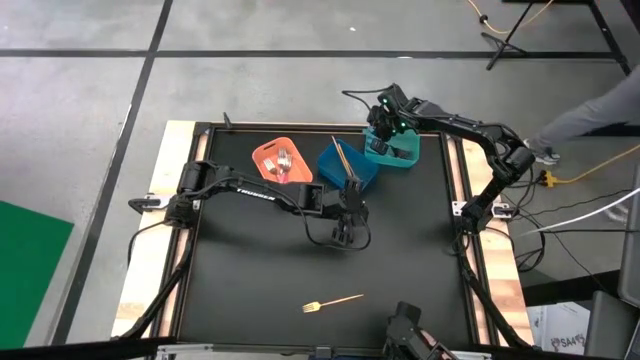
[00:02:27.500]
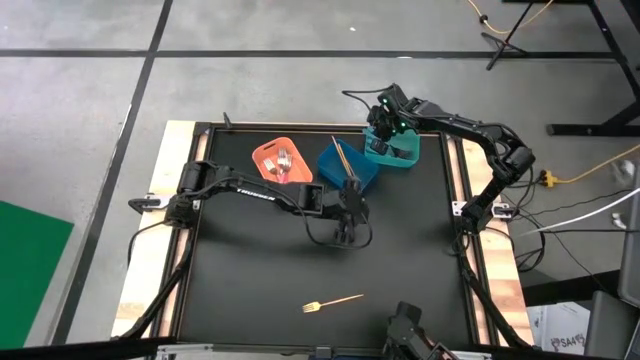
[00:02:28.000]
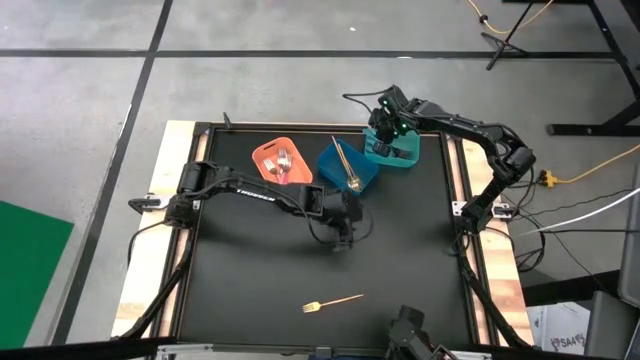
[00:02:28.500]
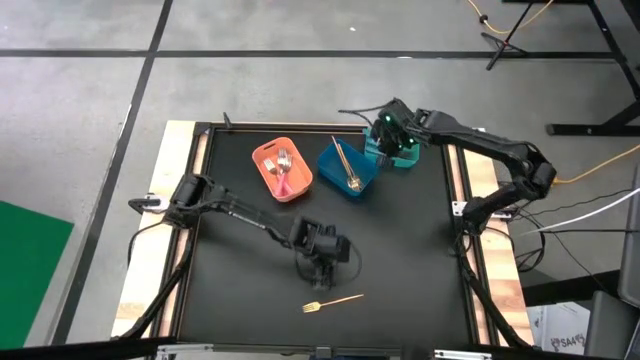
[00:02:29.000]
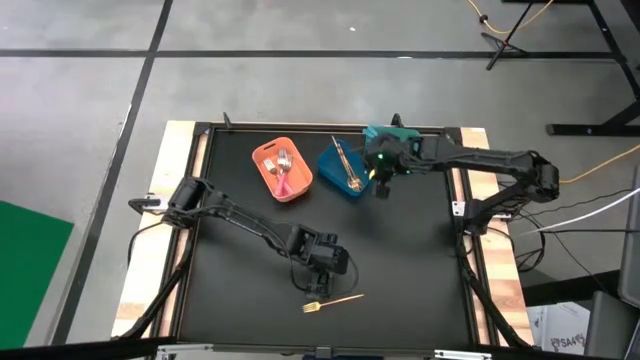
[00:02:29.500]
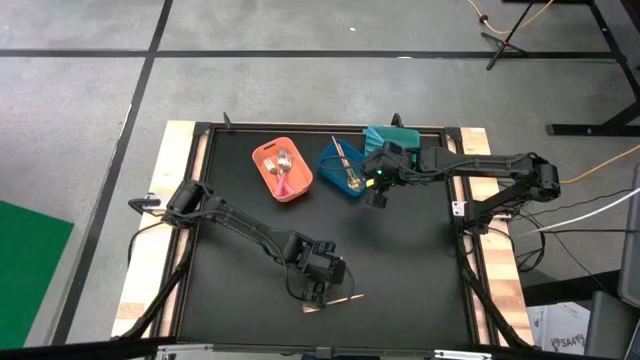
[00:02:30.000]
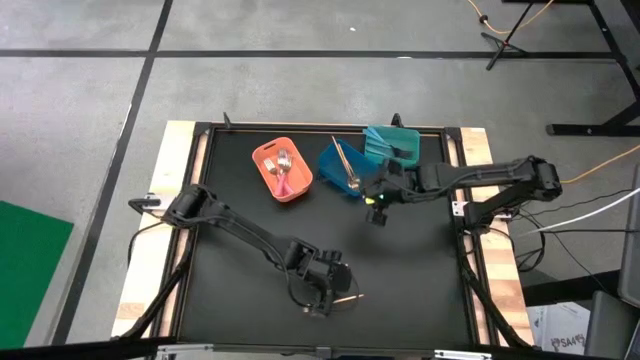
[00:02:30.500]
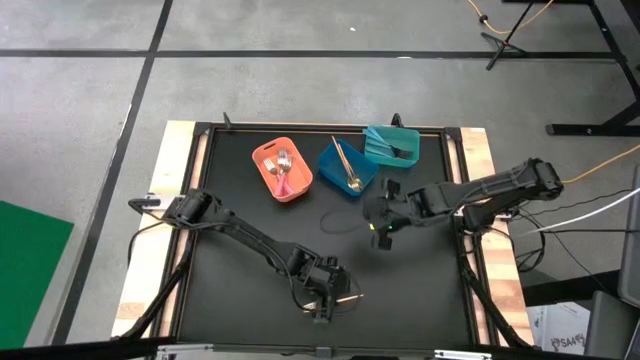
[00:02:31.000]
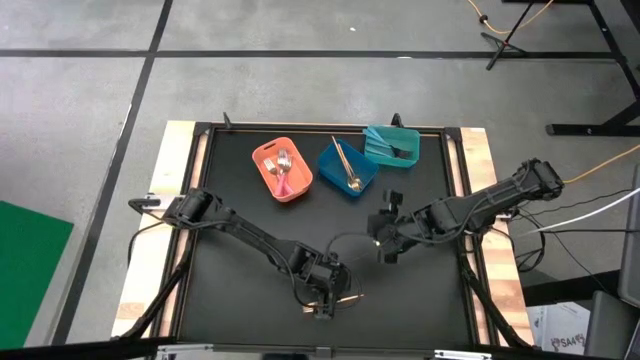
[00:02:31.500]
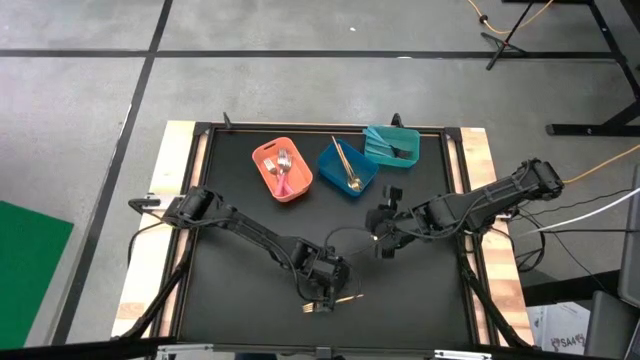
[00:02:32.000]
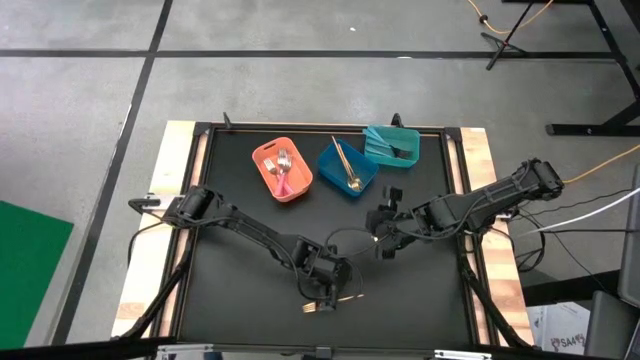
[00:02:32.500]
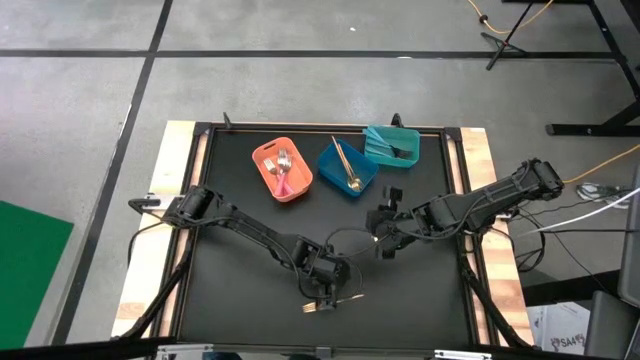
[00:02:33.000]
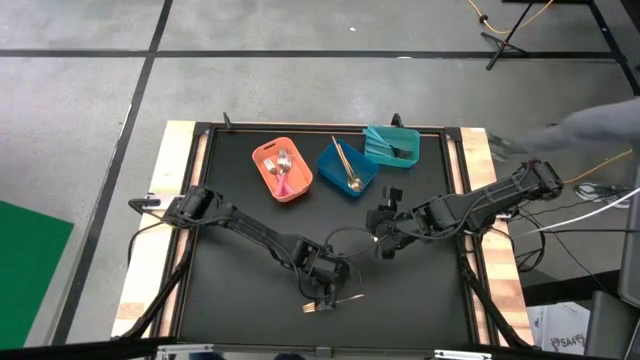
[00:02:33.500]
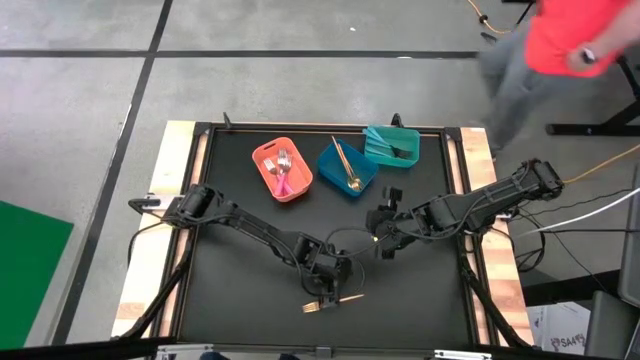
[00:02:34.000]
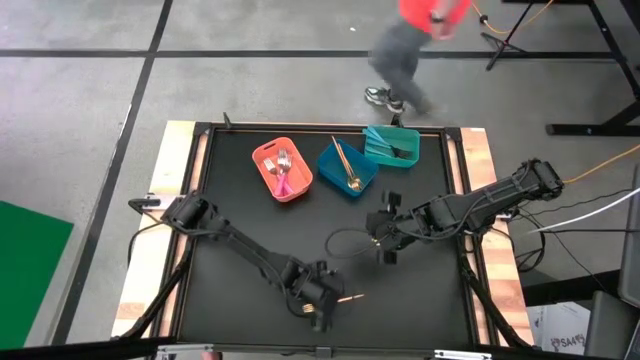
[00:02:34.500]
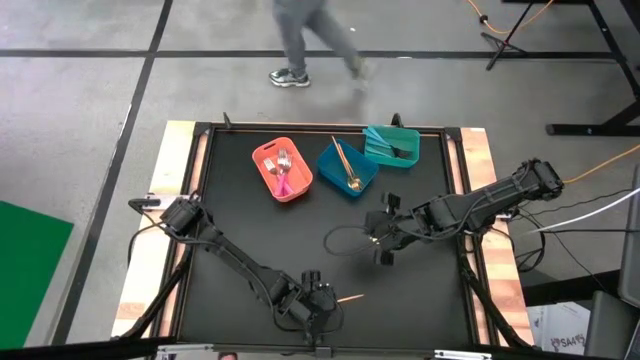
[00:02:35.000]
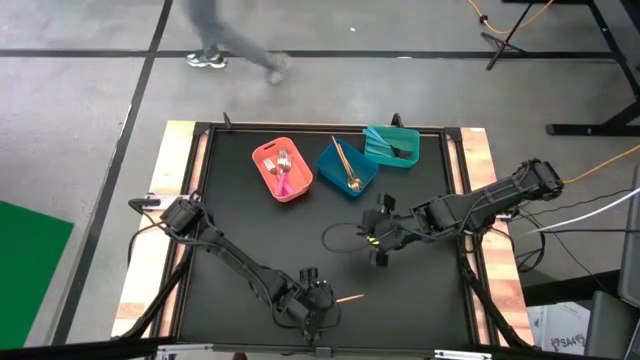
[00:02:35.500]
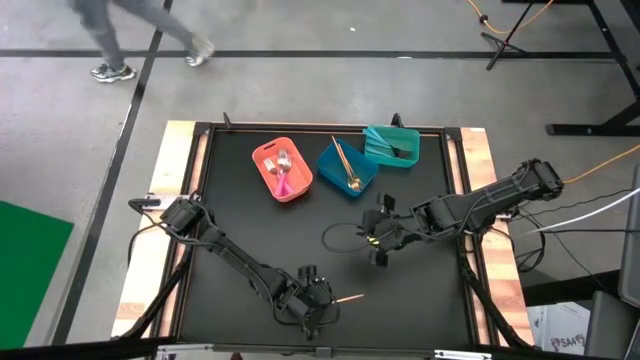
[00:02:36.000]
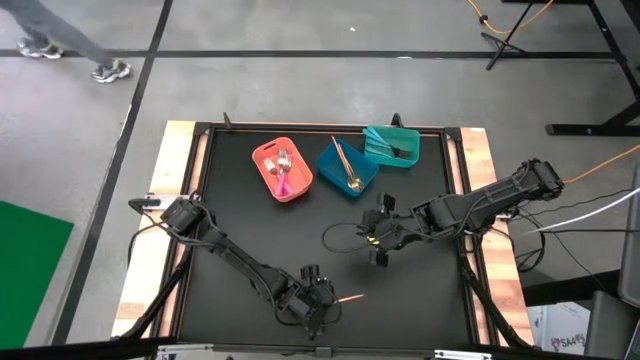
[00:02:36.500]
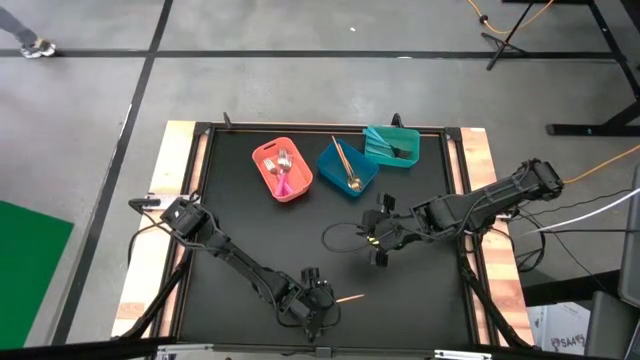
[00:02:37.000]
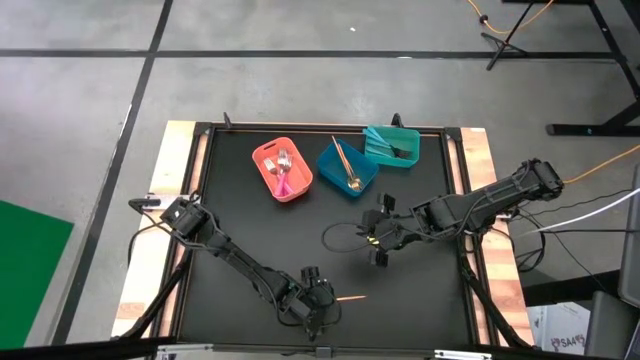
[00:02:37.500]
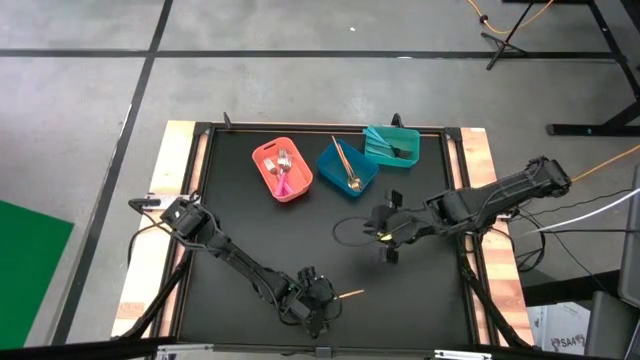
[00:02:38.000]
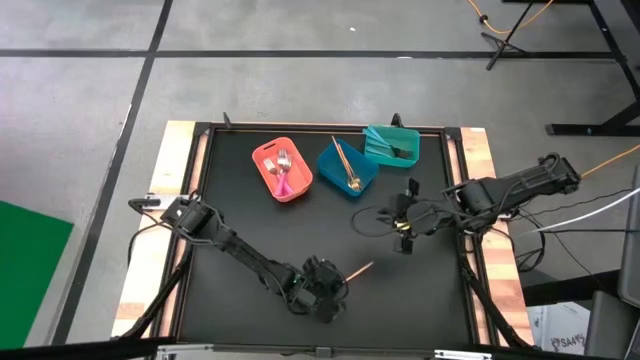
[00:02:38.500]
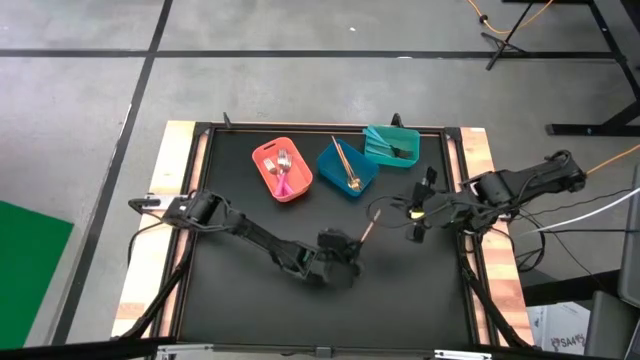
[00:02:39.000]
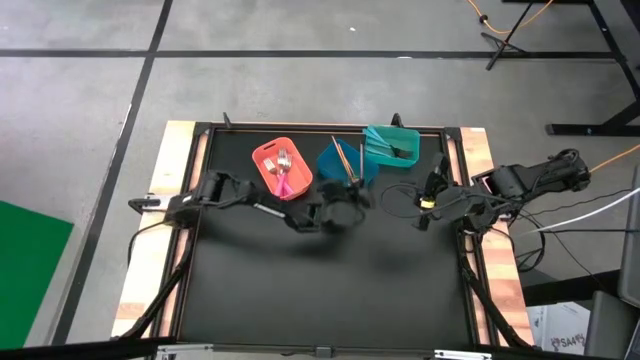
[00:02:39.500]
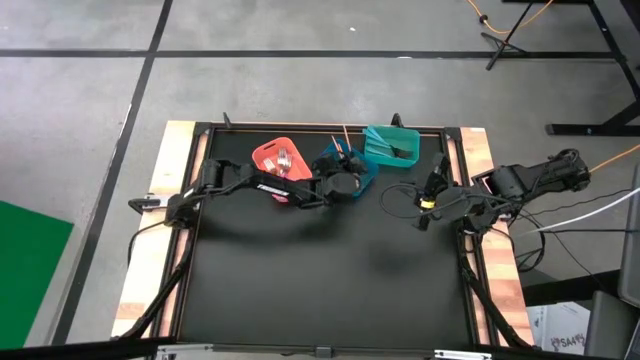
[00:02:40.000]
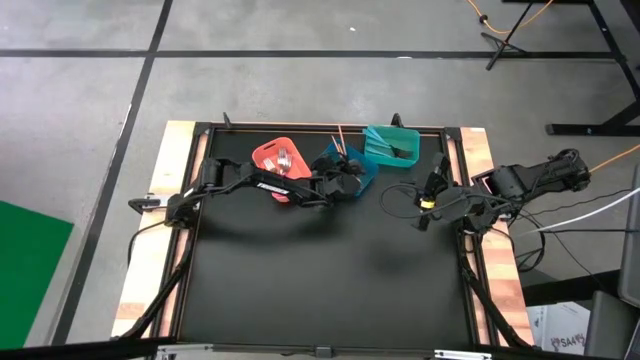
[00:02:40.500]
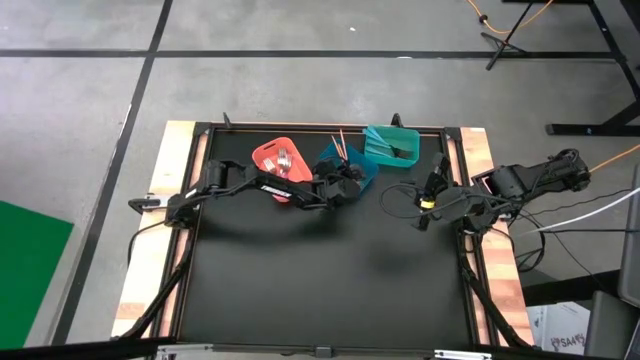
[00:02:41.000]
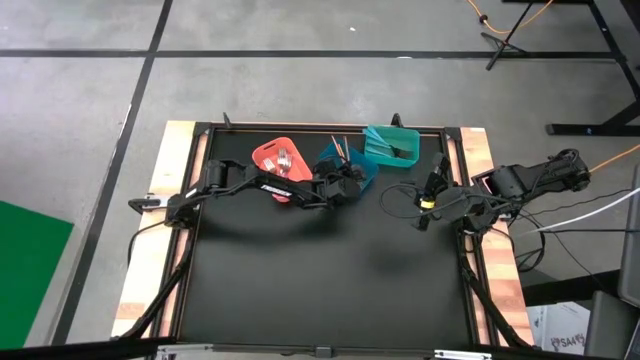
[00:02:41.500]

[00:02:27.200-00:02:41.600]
Task: Sort silverware by color (type)
Put the gold fork into the blue bin

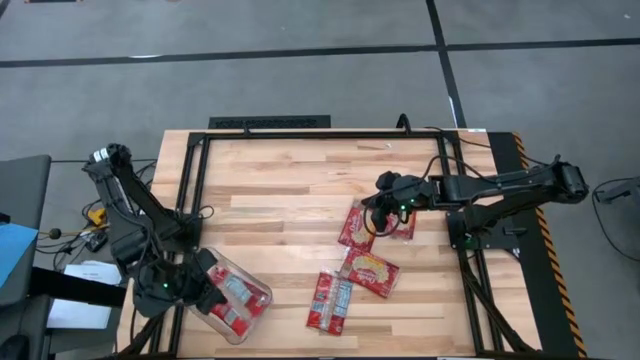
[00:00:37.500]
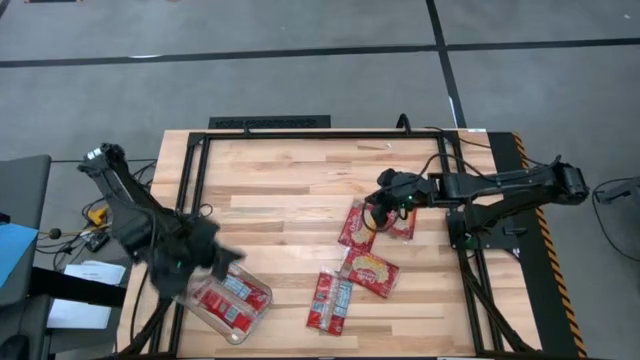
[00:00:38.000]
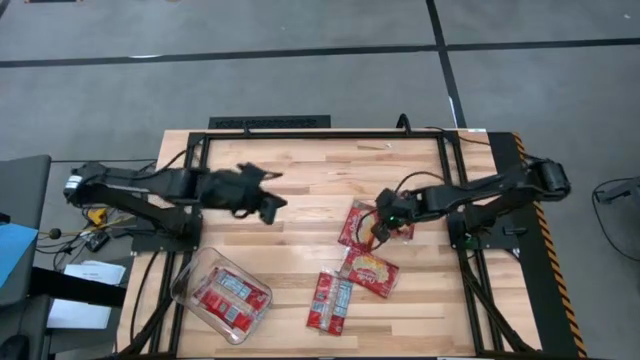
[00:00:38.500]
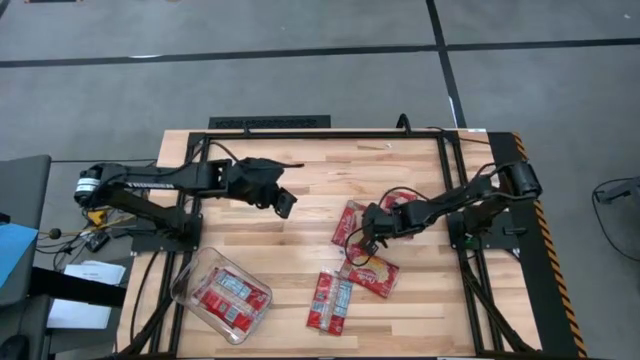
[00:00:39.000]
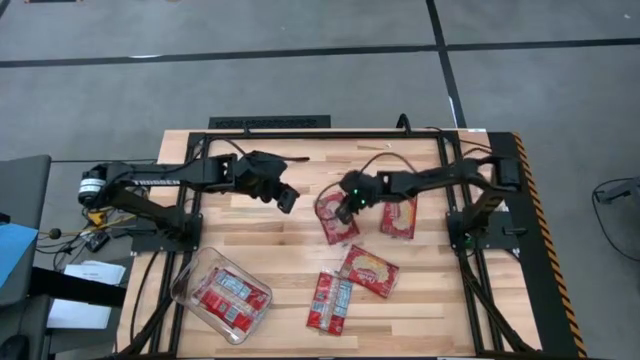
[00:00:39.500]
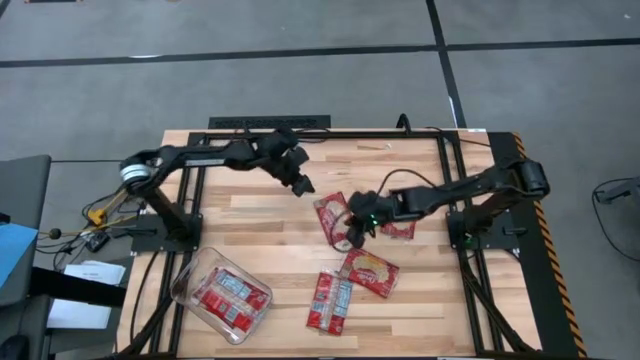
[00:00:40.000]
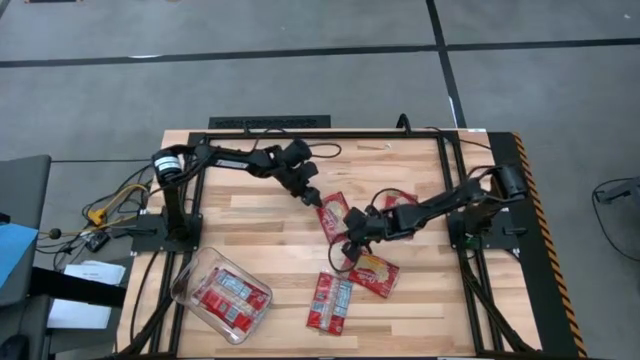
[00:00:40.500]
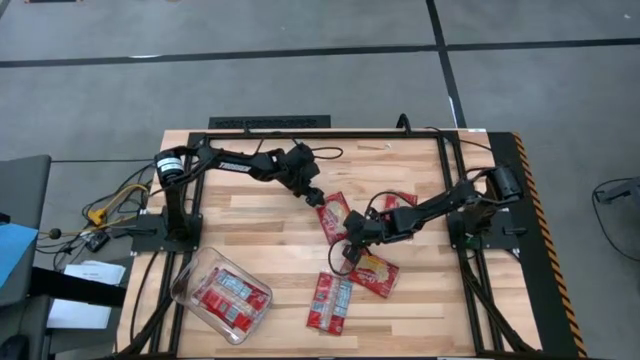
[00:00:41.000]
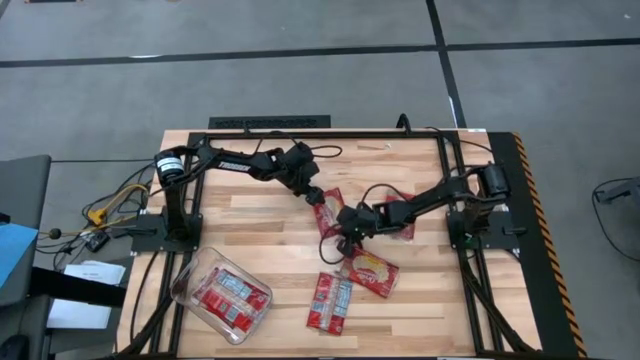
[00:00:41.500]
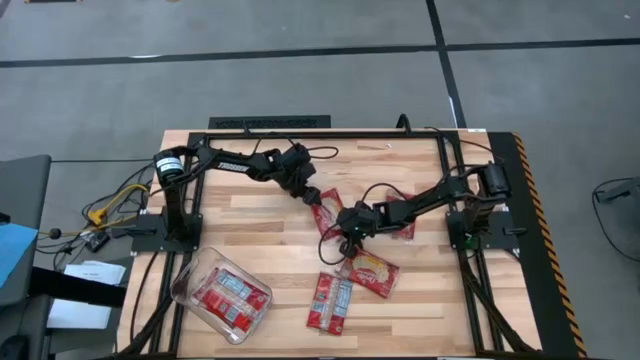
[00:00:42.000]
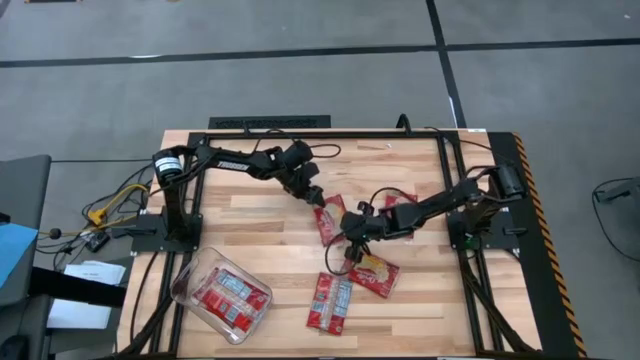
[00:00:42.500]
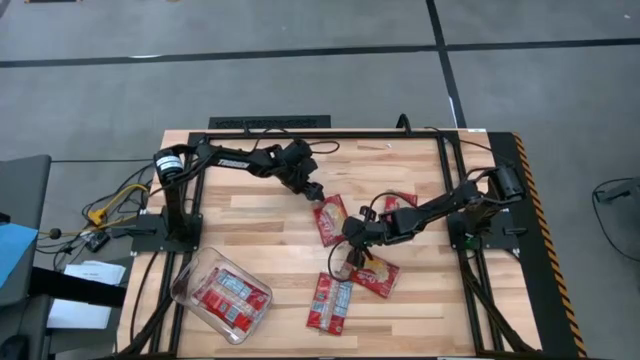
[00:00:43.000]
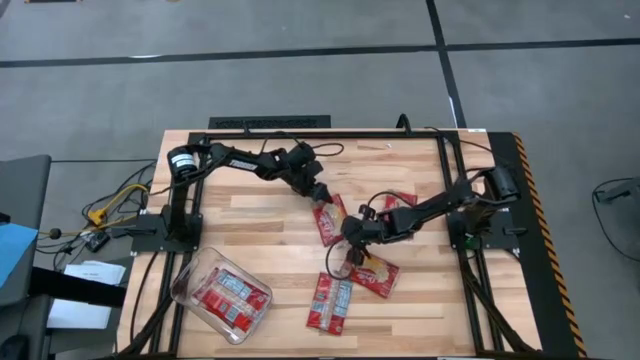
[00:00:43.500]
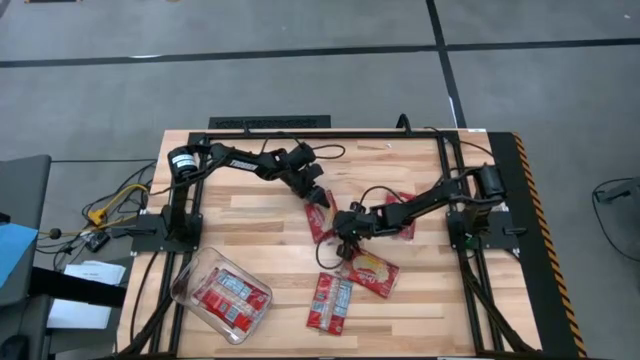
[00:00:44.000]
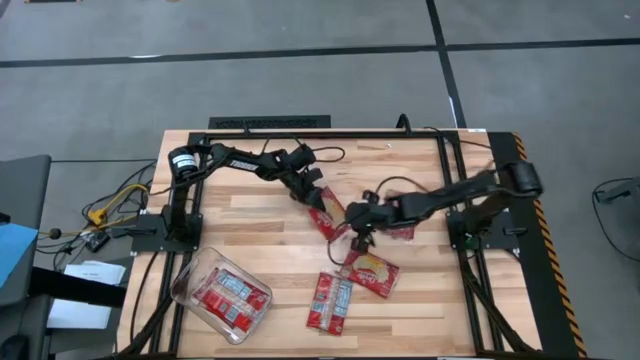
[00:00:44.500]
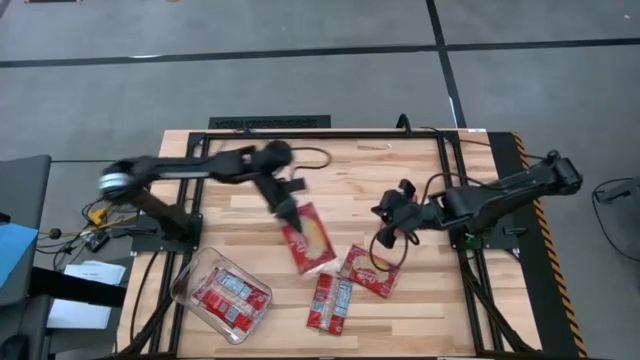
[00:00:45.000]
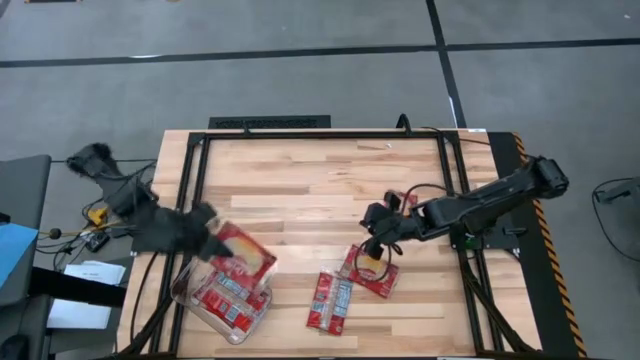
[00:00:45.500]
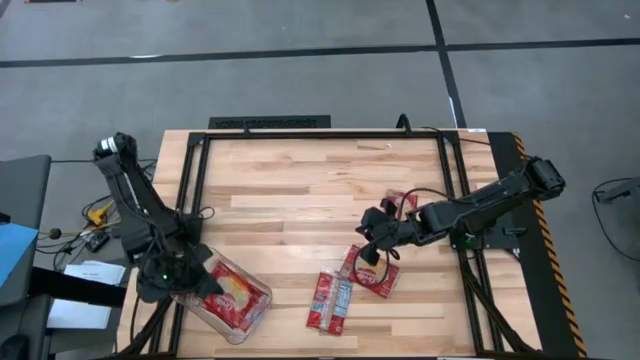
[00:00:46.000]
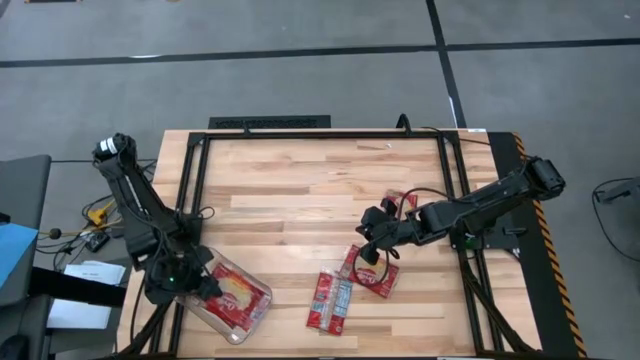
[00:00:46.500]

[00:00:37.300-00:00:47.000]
Task: Sort popcorn bags into baskets
Put the red popcorn bag into the transparent bin
